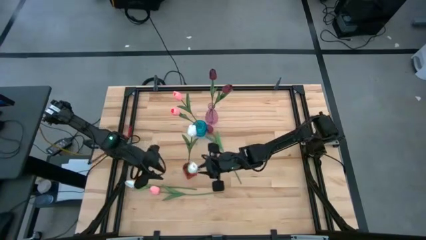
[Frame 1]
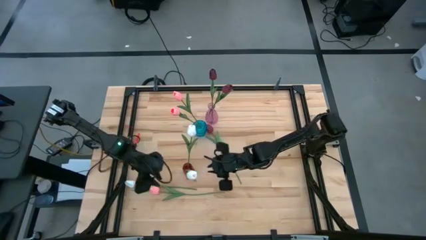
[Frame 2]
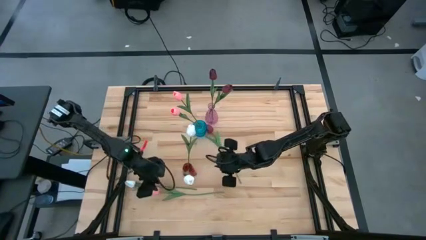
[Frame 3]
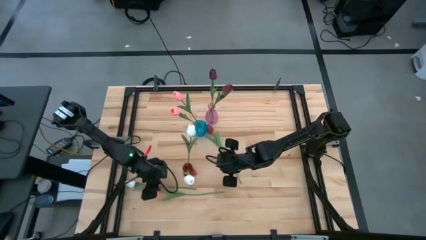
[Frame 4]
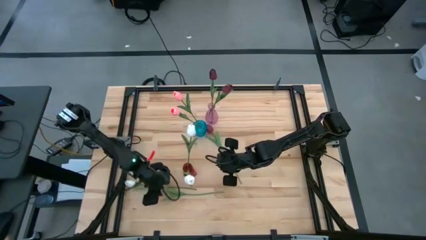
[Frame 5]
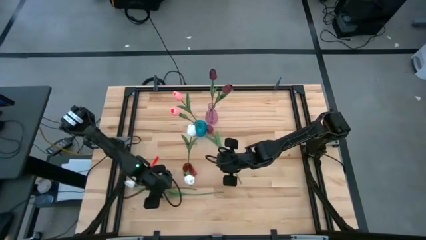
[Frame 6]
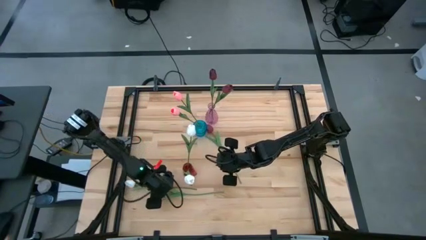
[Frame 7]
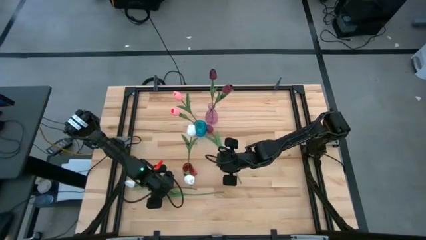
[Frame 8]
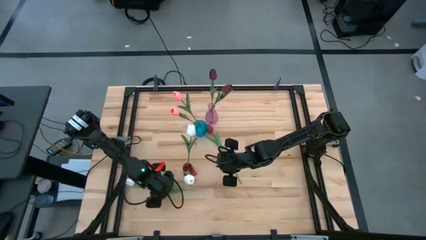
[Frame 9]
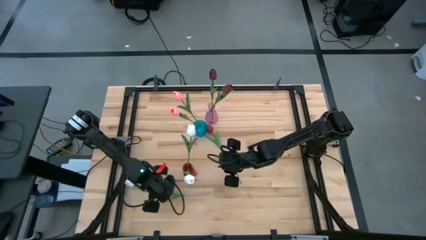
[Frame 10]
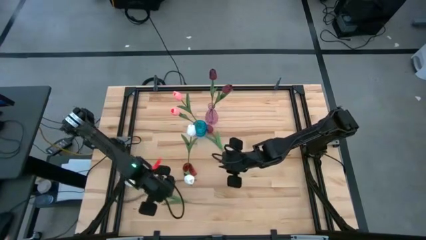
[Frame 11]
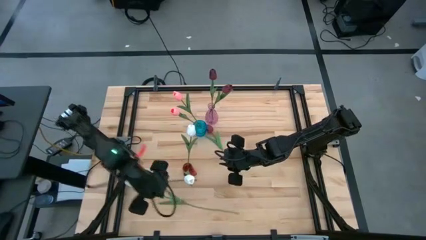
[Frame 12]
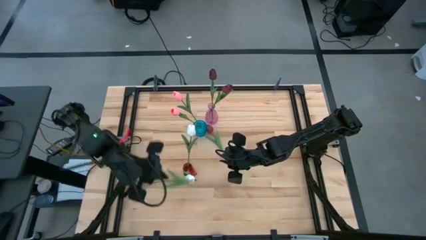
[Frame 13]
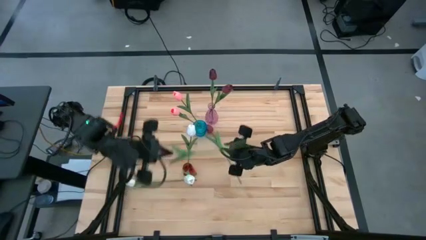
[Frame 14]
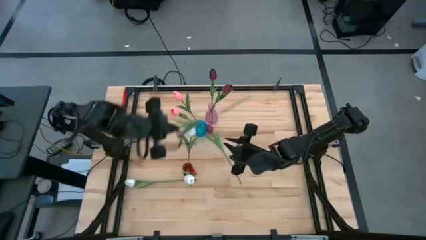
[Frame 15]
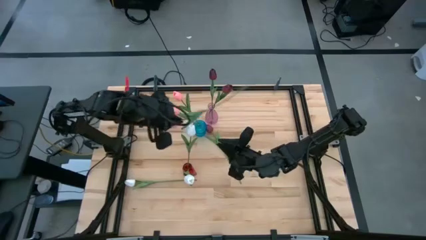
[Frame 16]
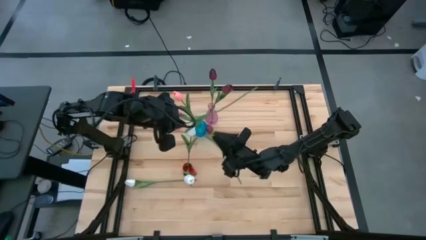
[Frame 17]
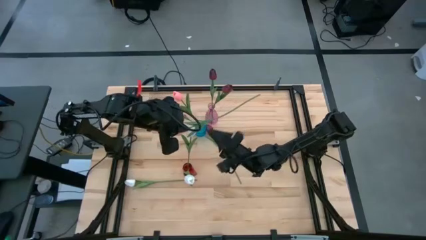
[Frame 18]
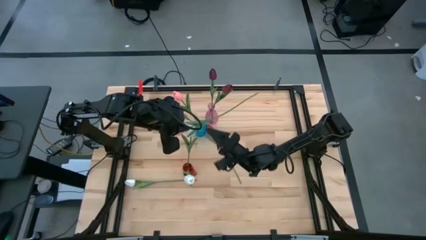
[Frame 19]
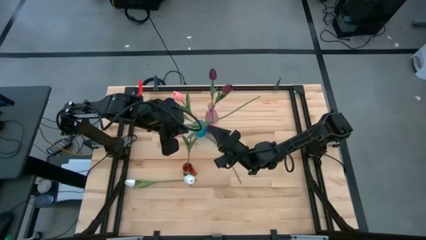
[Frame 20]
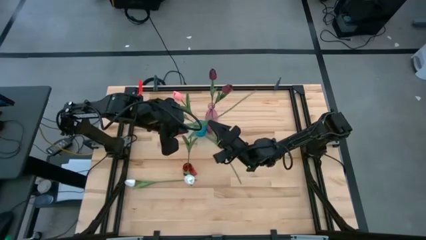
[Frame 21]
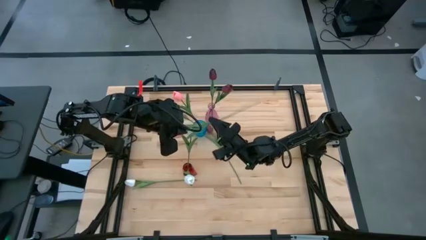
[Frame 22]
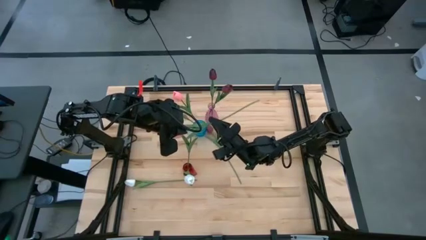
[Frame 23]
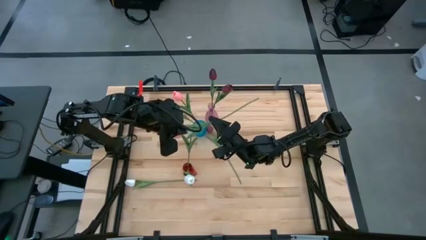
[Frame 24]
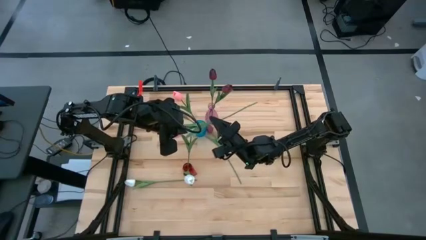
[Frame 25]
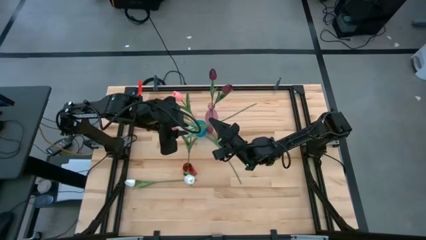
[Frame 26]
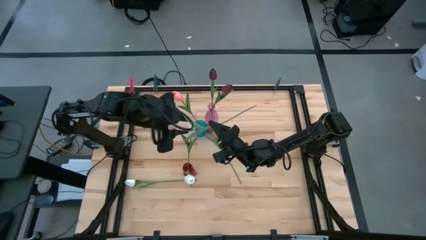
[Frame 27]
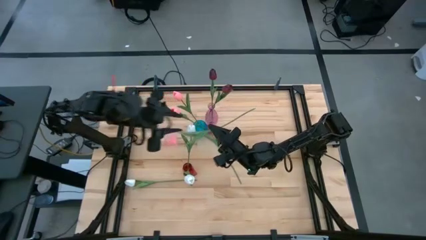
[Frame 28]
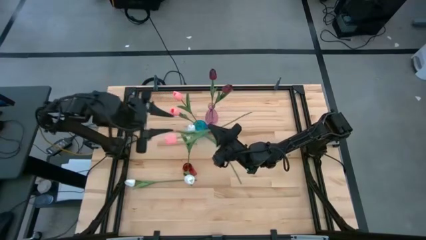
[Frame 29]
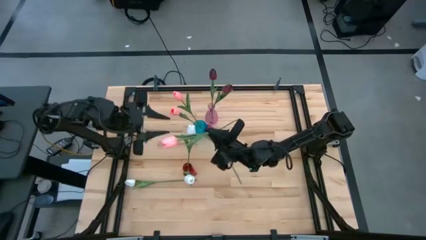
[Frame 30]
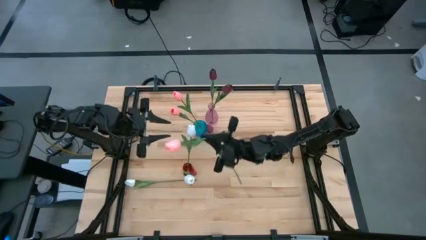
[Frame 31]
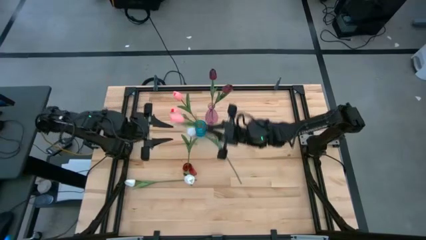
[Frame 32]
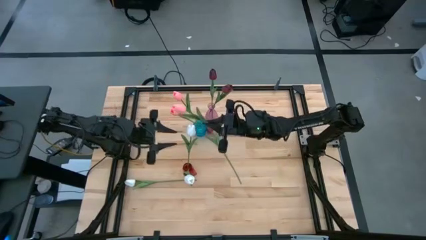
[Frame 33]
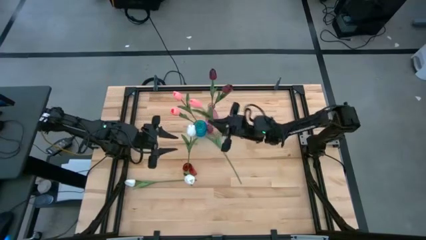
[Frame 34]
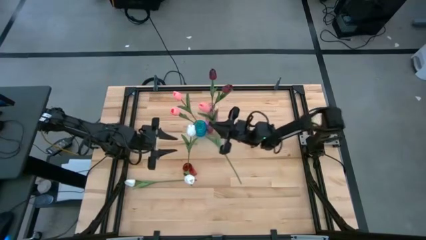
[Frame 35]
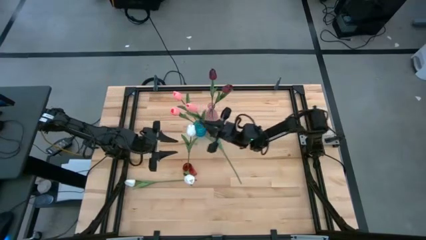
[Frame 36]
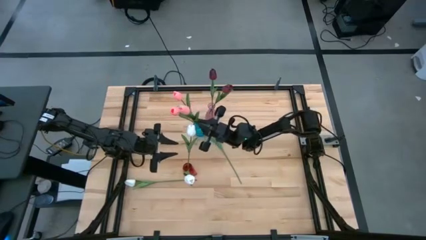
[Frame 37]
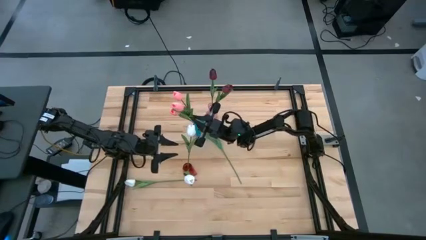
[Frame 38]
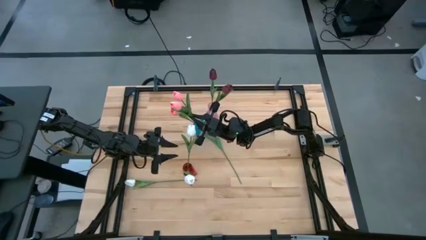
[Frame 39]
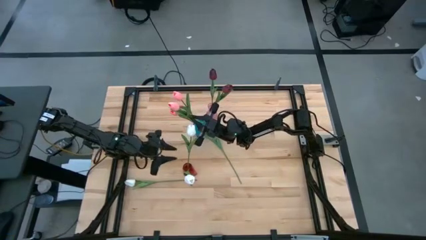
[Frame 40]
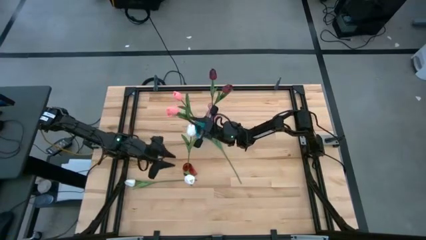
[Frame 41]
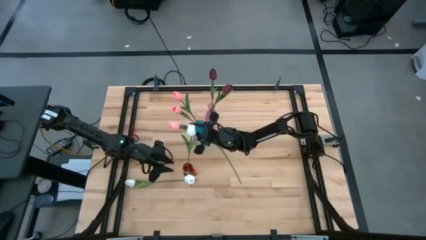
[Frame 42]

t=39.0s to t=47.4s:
Task: Sort flowers into vase by color
Put the pink flower into the blue vase

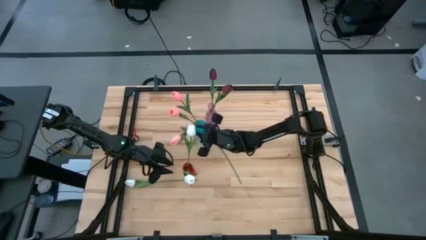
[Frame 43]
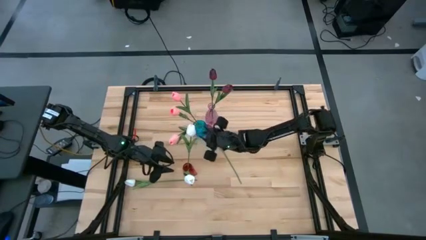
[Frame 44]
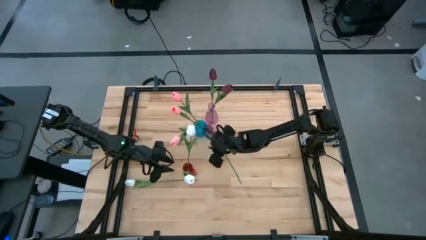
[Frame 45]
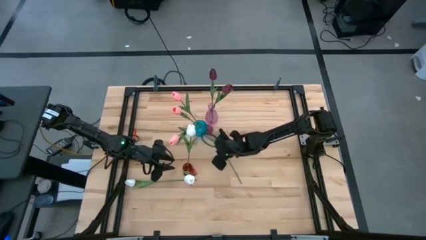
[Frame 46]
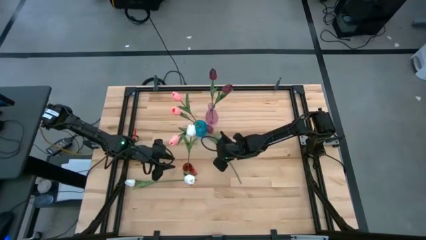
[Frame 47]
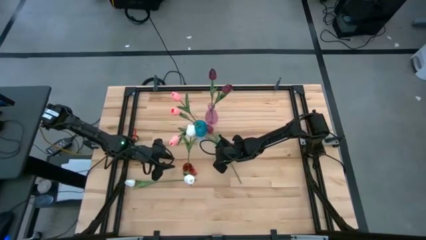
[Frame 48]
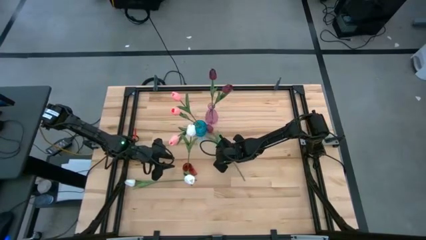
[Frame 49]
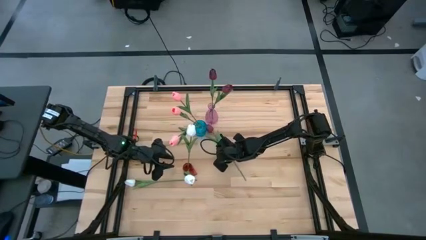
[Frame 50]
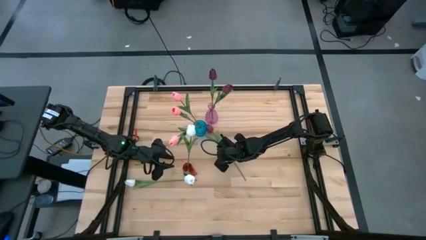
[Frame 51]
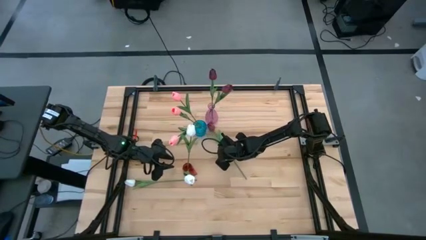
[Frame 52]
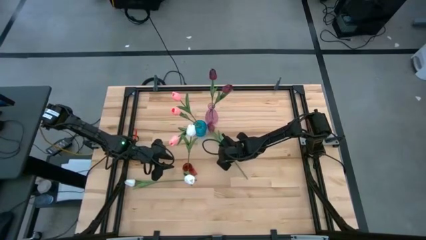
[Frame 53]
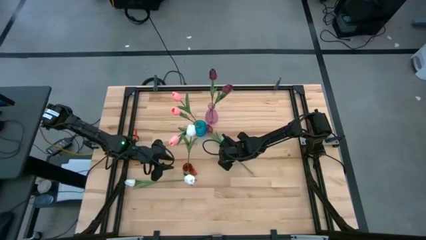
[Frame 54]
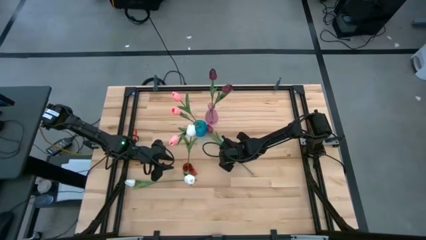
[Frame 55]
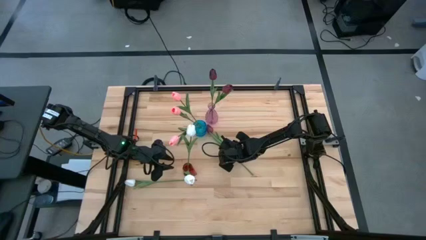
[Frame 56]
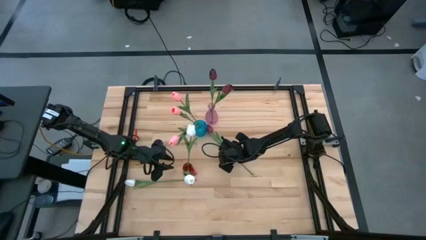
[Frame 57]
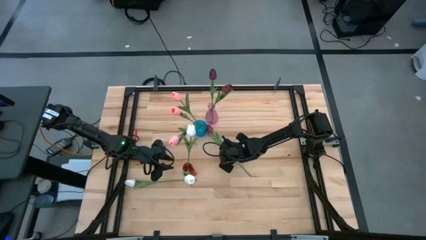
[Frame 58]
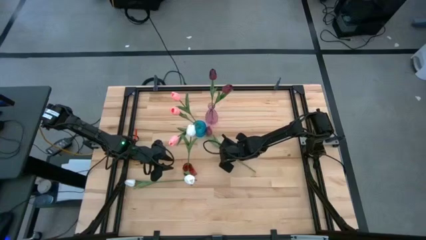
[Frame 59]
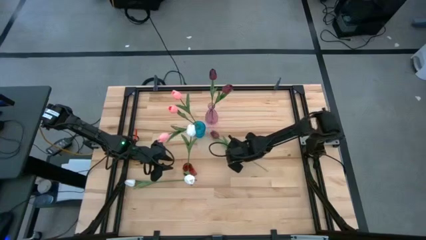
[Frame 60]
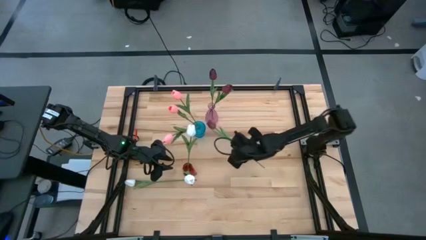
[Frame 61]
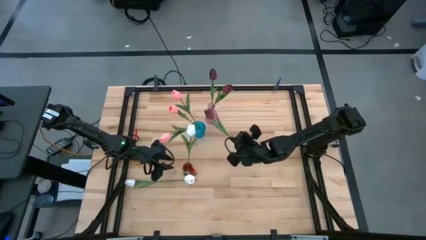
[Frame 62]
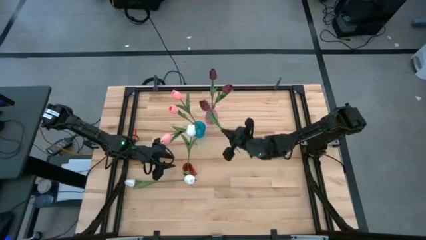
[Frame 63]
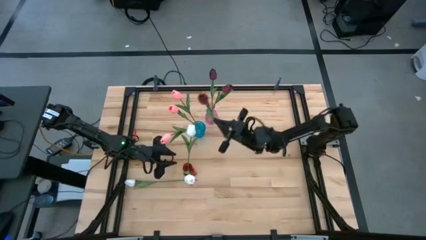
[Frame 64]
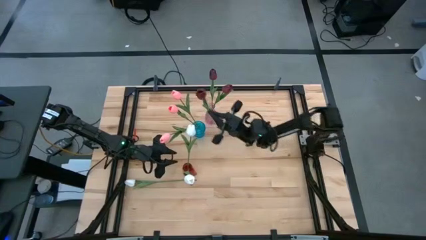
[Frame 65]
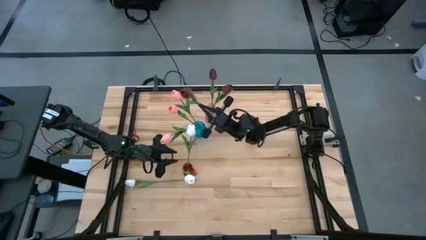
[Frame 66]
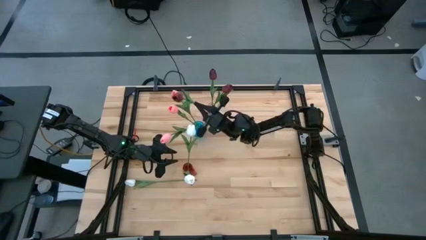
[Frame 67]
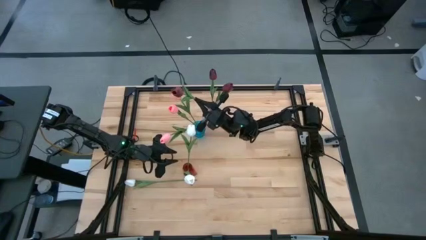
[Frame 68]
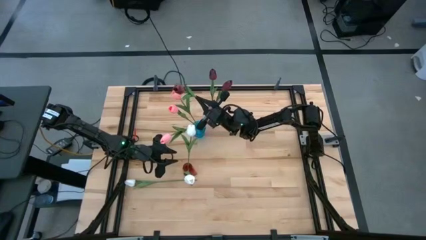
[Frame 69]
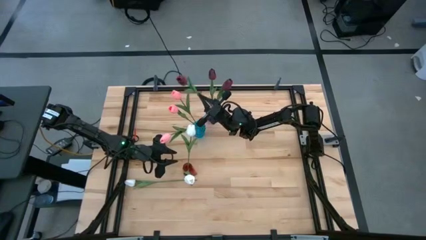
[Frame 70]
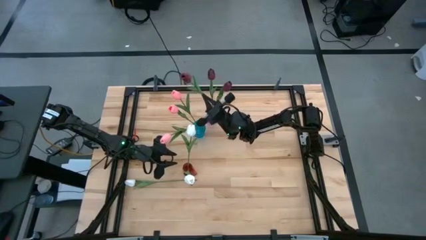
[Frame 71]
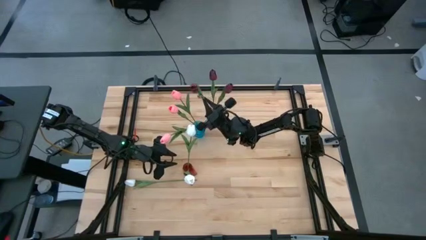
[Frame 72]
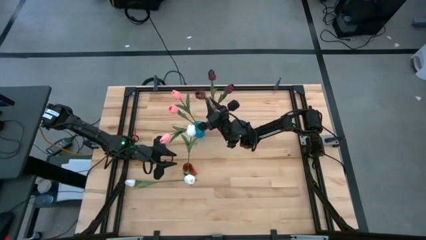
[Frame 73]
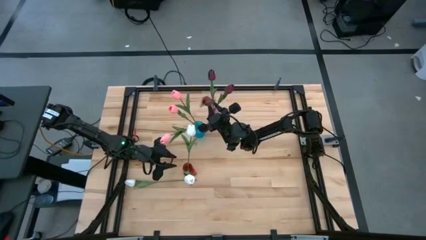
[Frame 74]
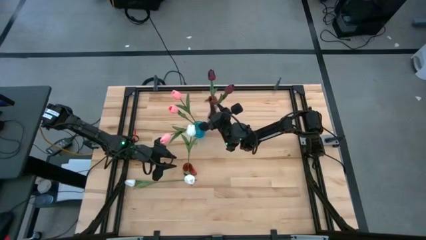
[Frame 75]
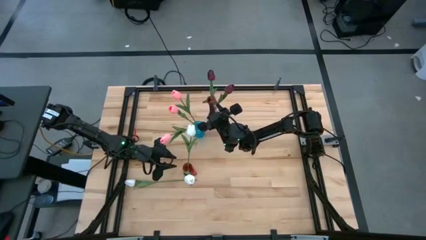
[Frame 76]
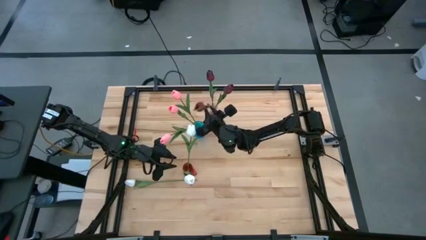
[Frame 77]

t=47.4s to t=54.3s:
Put the red flower into the pink vase

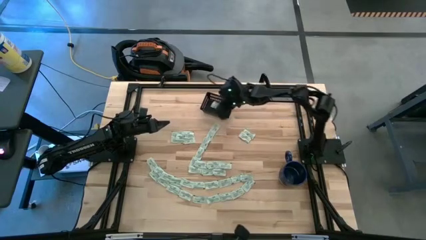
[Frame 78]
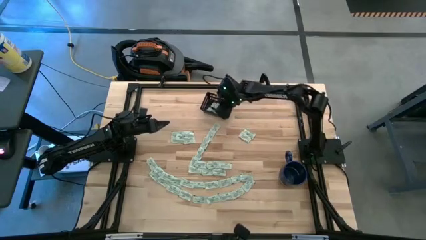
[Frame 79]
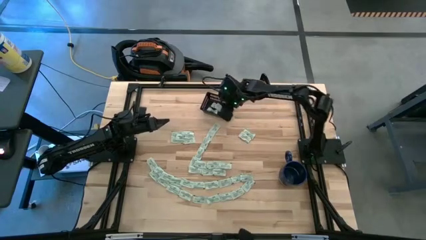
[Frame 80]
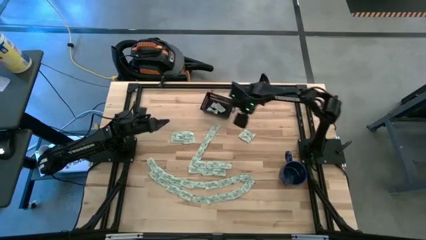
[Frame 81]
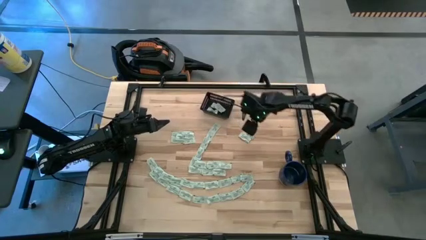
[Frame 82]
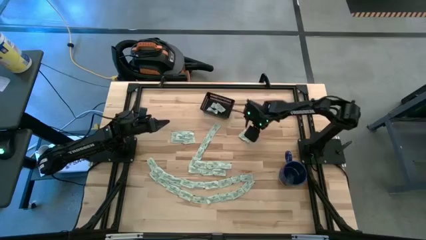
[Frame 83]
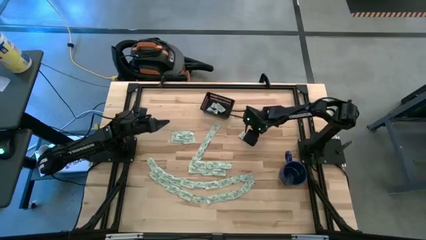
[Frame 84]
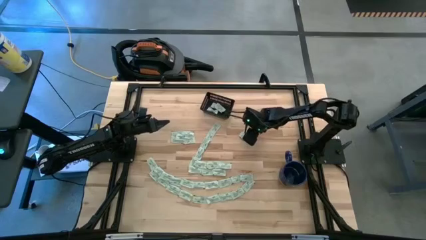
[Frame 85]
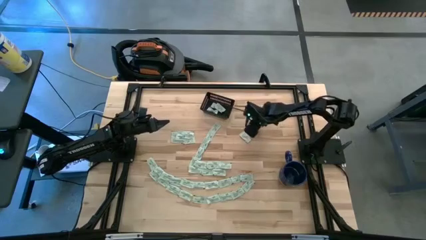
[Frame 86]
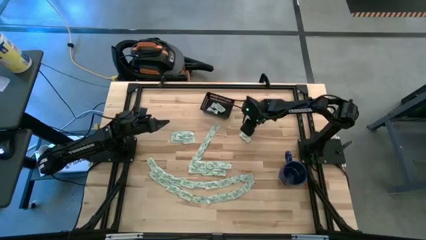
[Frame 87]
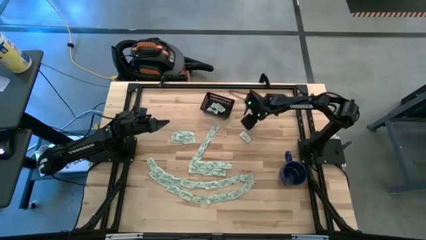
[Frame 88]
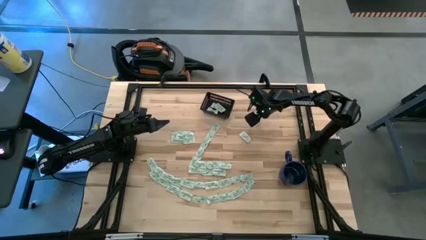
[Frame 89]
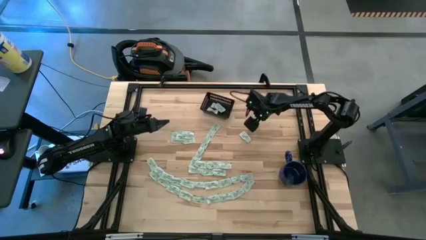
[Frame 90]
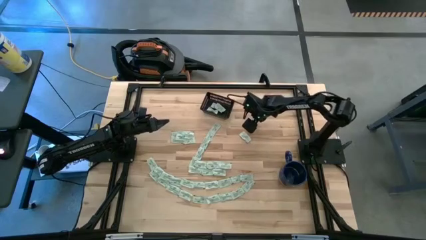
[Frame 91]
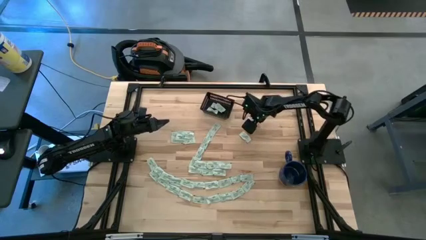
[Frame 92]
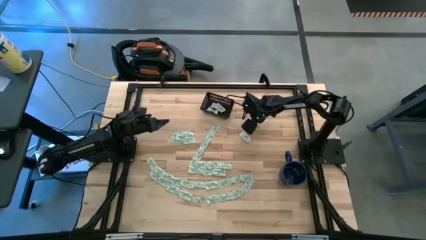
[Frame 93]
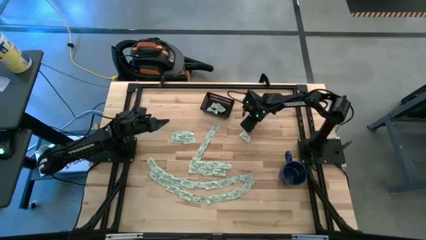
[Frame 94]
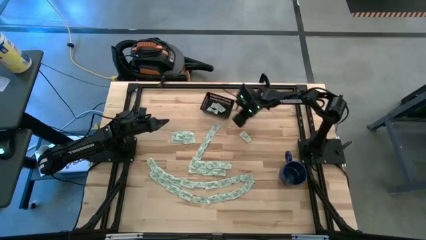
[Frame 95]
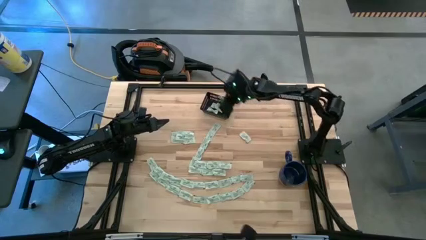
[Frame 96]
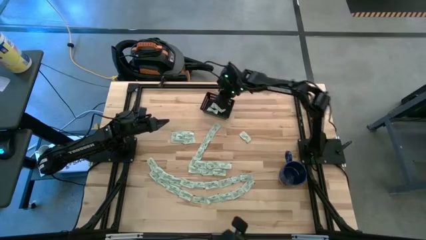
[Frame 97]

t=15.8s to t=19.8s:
Task: Pick and place Stevia / Truvia into bins
Put the stevia packet into the black bin
